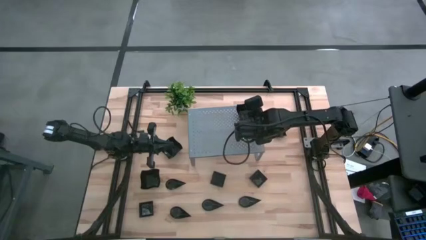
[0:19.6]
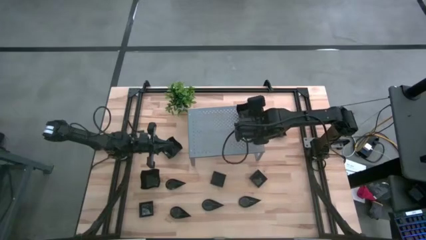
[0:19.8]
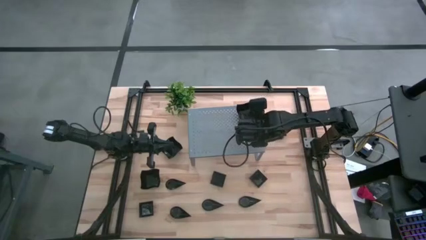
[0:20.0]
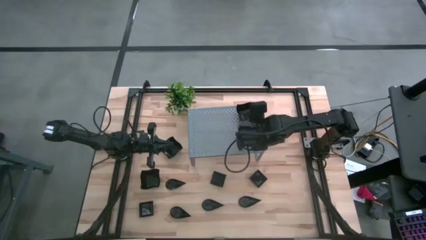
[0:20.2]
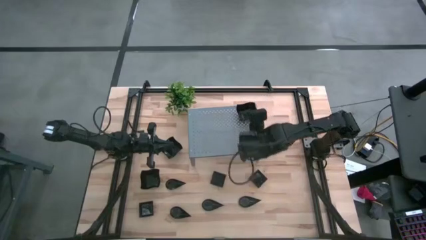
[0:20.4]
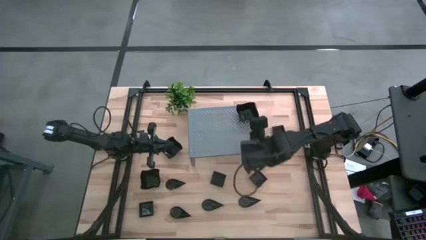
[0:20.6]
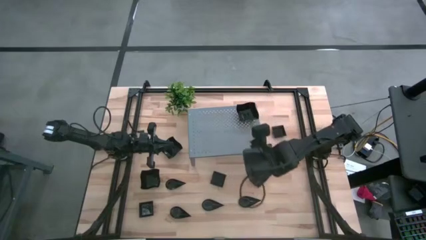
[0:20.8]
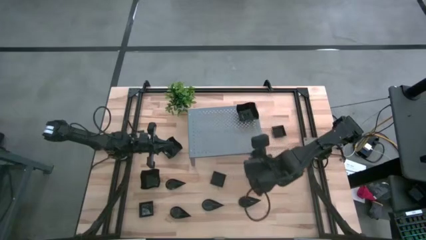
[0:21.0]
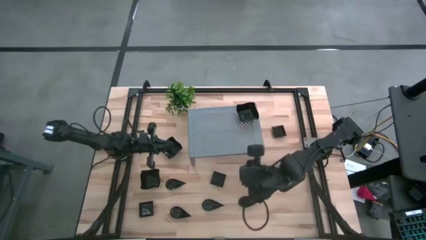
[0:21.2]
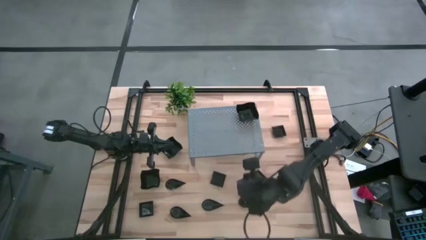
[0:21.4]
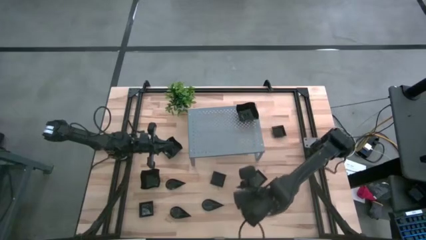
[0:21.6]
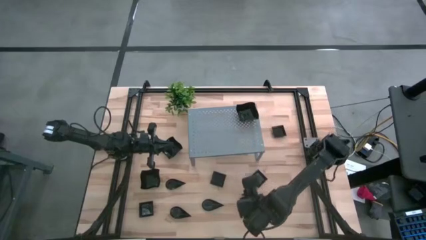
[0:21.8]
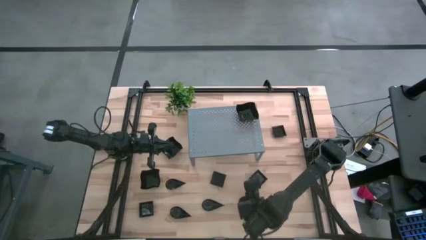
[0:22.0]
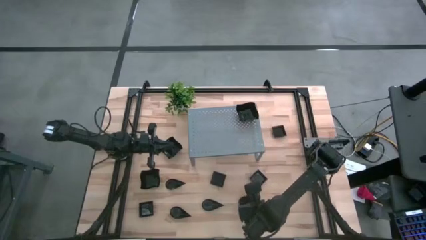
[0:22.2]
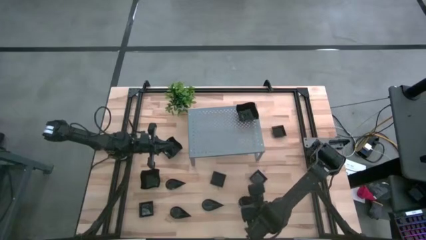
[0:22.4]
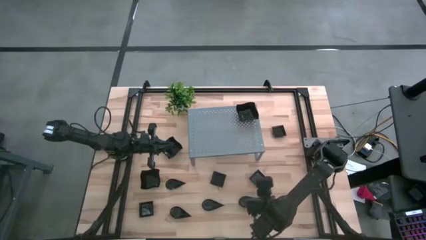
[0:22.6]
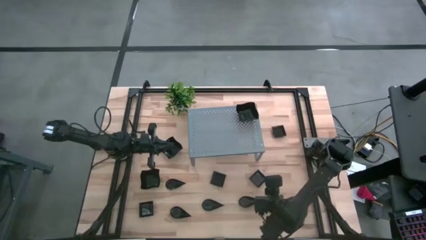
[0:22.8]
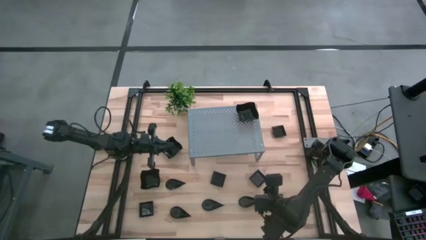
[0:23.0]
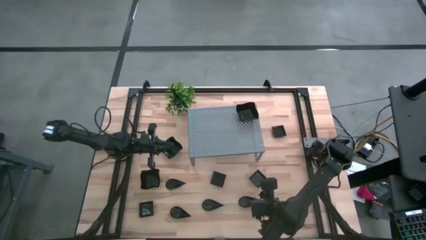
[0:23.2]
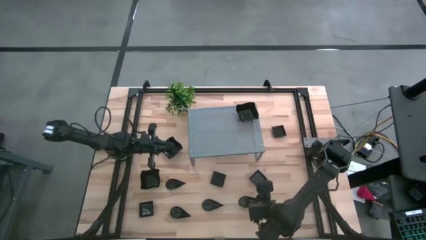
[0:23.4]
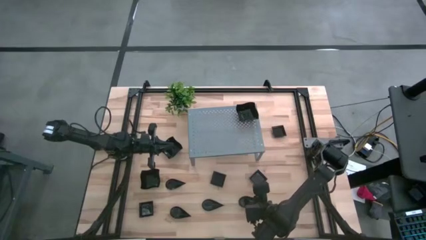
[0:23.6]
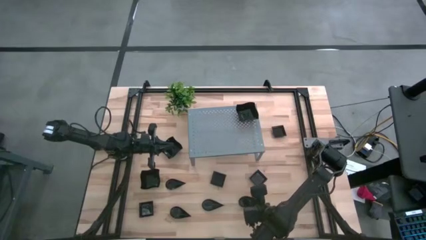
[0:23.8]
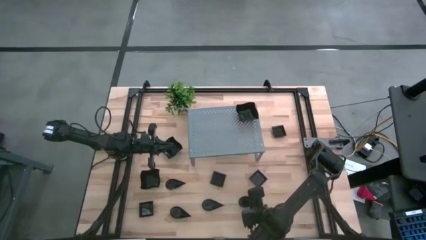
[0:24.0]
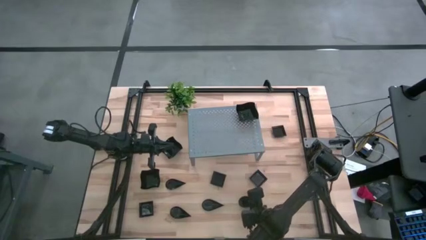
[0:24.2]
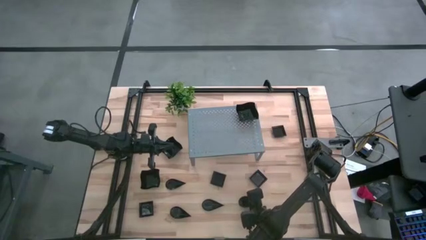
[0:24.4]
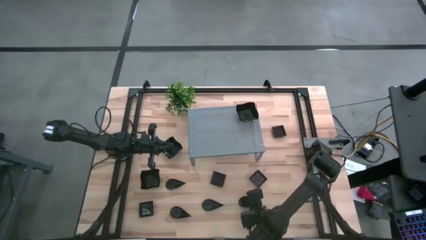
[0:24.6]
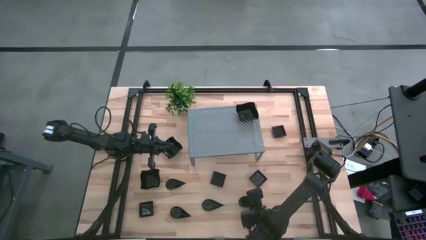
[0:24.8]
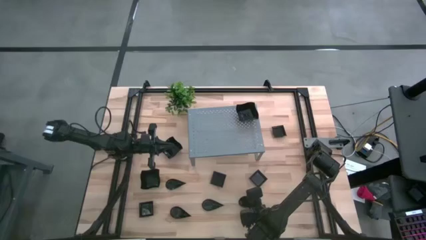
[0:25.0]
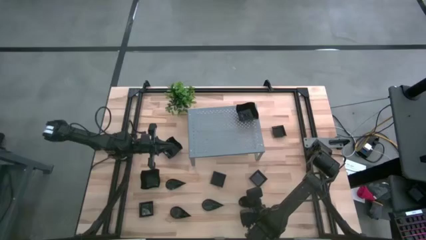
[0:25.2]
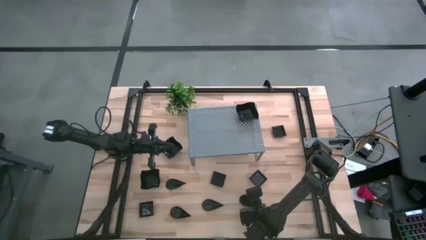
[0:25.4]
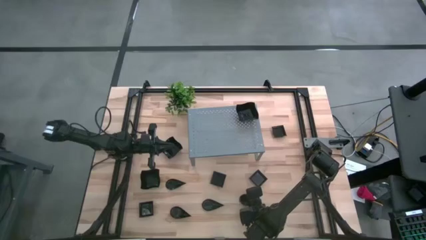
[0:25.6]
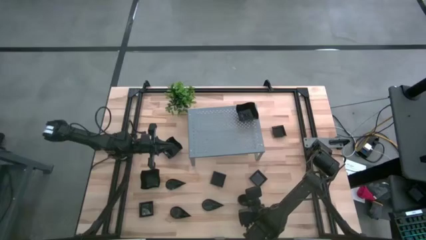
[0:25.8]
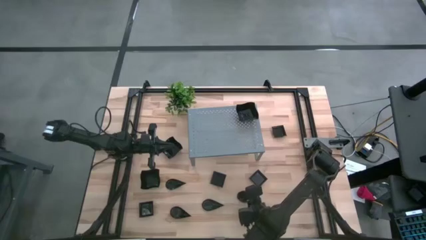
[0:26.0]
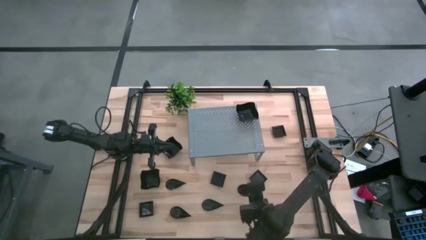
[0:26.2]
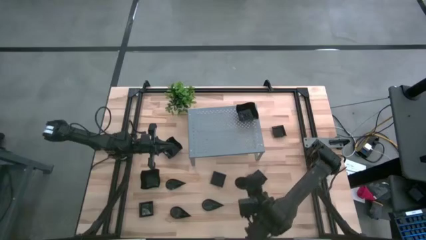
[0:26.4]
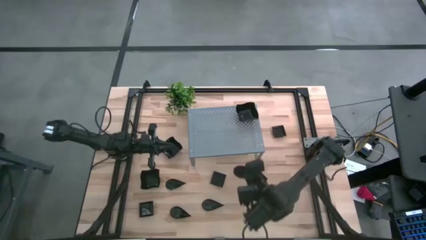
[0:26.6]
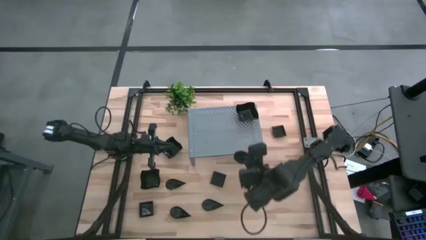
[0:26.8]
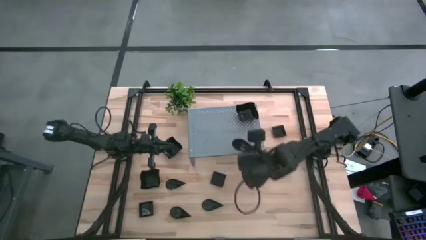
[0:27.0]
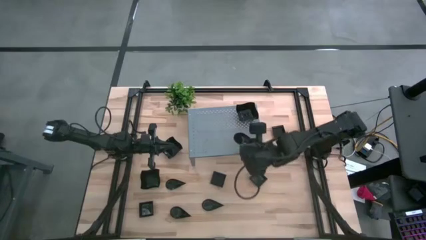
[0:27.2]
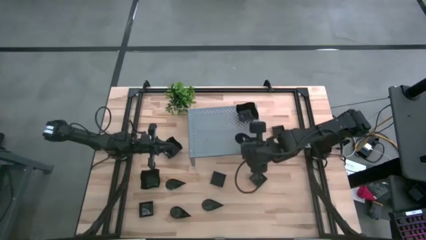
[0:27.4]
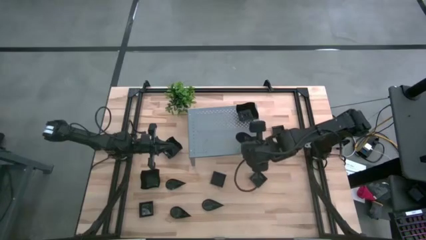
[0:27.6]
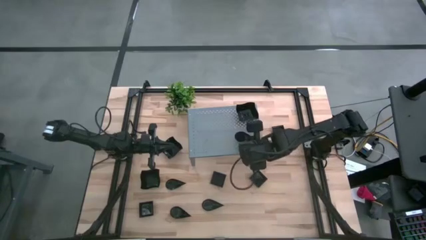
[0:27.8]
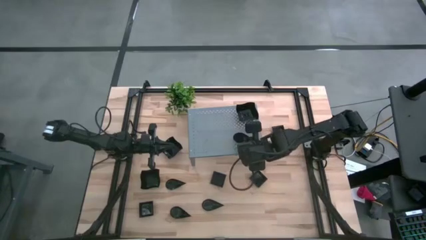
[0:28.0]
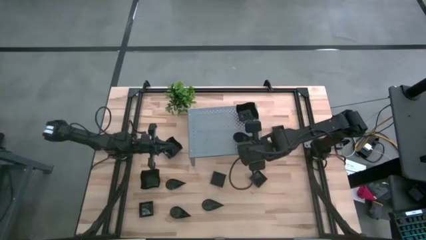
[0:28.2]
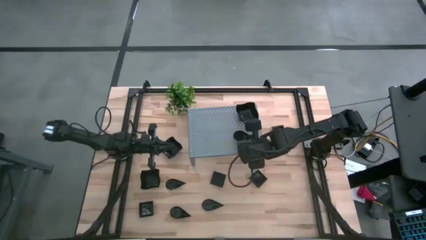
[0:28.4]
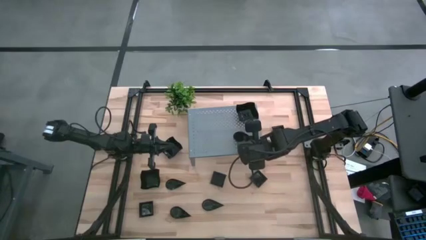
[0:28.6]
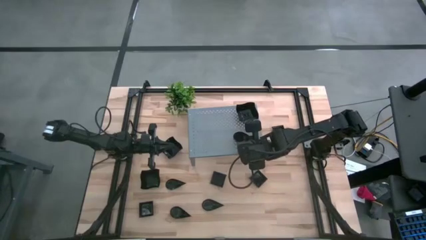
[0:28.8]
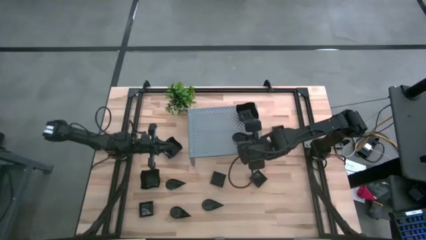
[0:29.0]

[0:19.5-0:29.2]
Task: Pick & Place Mini shaped plates
Put the black drop-shaped plate on the shelf

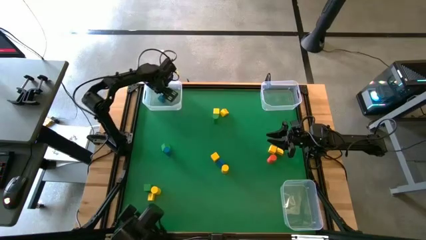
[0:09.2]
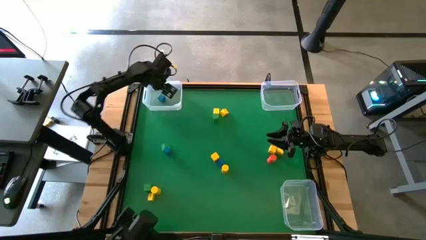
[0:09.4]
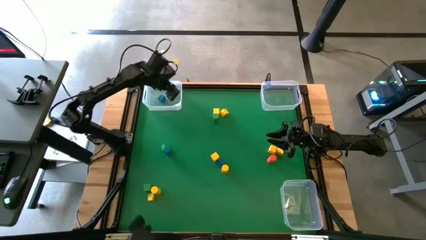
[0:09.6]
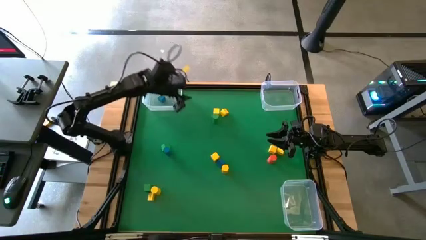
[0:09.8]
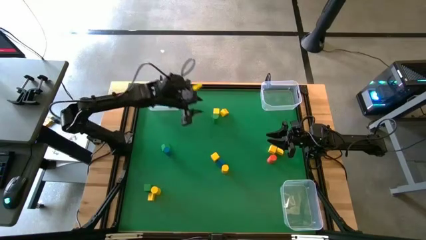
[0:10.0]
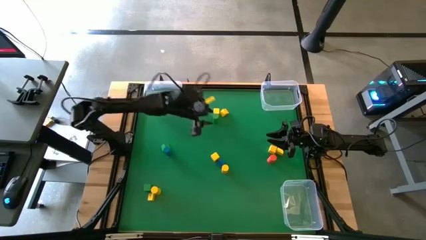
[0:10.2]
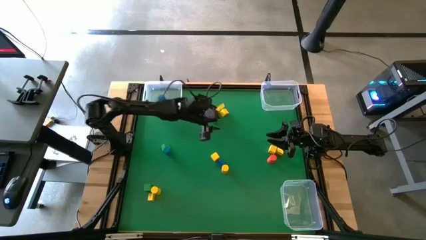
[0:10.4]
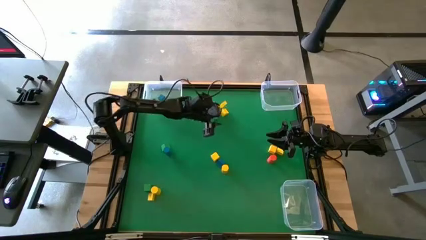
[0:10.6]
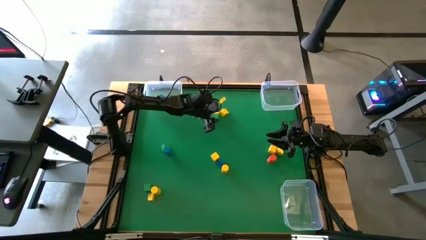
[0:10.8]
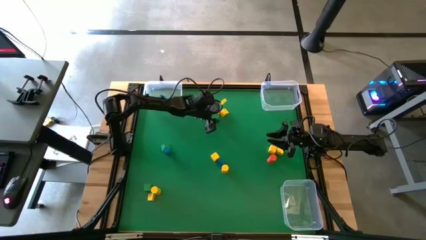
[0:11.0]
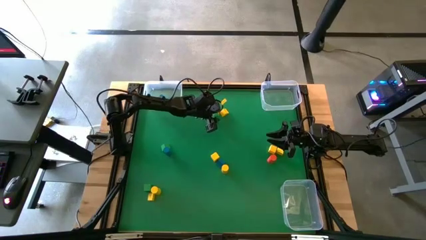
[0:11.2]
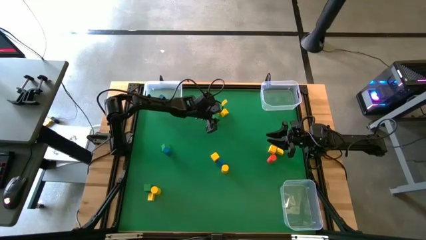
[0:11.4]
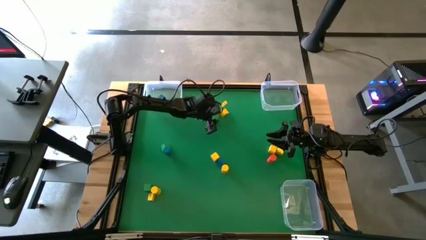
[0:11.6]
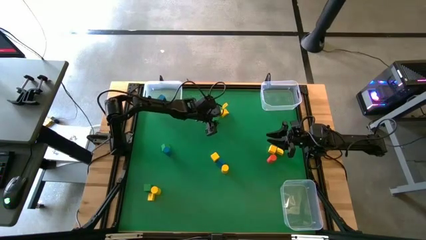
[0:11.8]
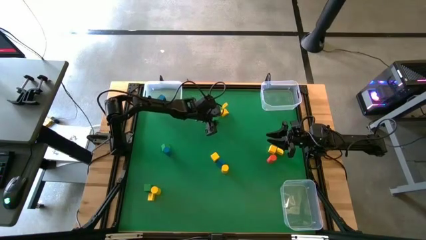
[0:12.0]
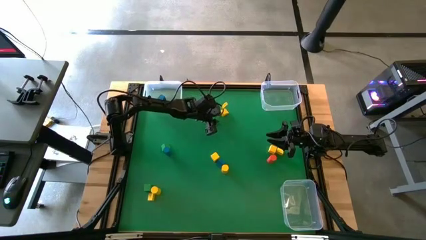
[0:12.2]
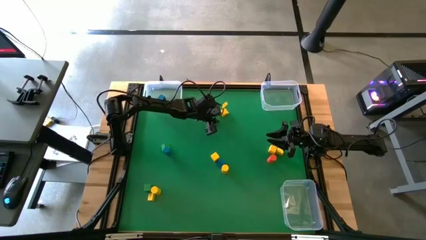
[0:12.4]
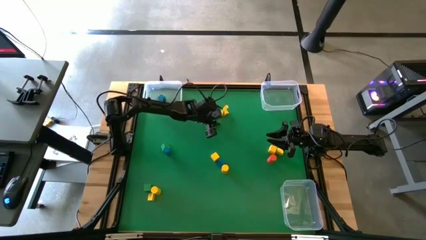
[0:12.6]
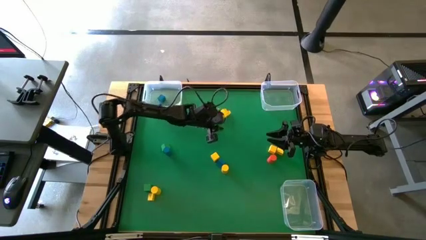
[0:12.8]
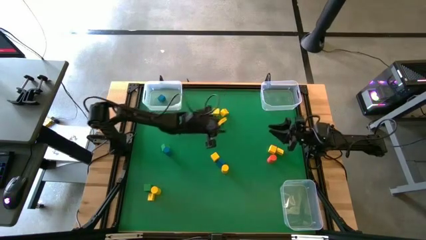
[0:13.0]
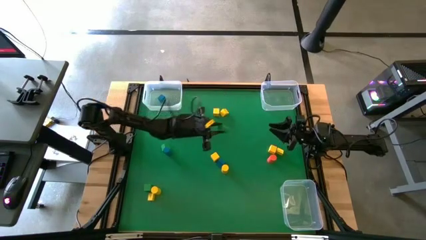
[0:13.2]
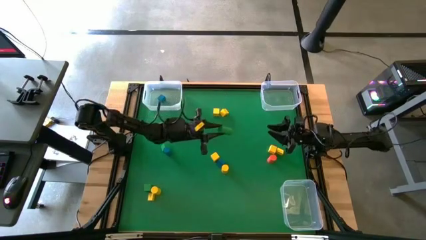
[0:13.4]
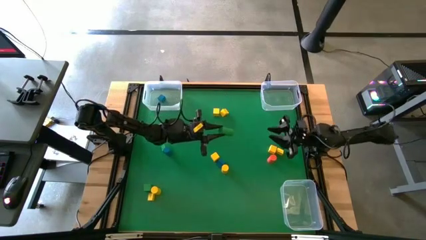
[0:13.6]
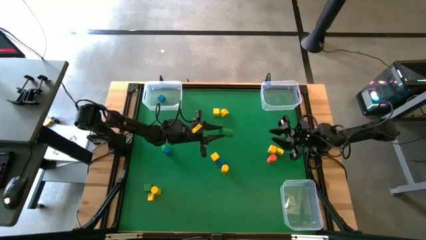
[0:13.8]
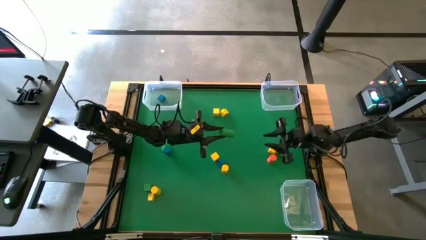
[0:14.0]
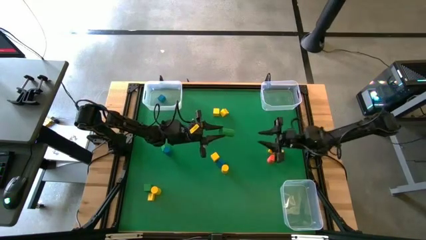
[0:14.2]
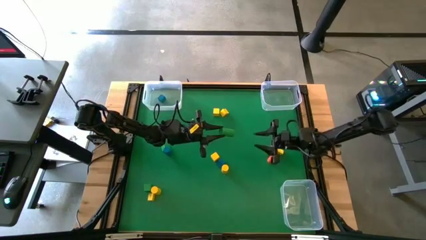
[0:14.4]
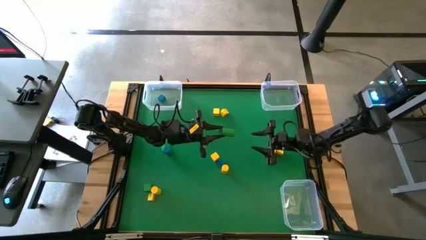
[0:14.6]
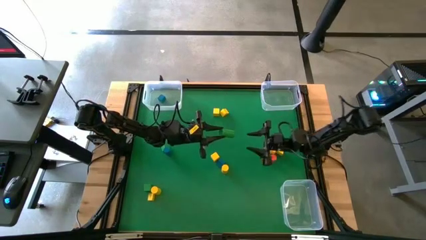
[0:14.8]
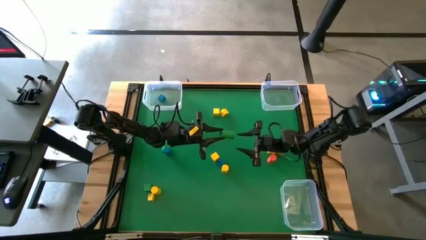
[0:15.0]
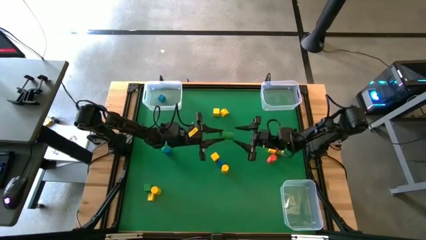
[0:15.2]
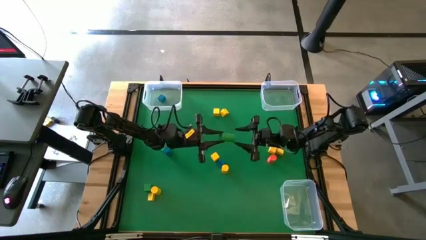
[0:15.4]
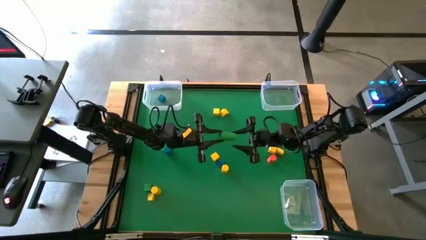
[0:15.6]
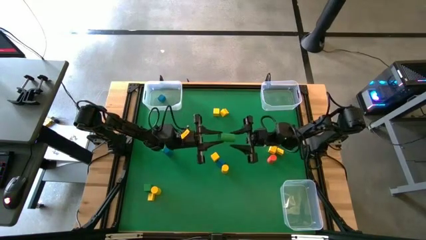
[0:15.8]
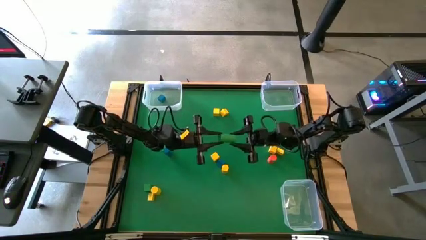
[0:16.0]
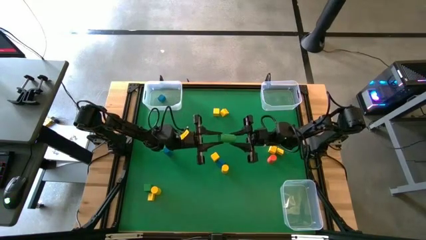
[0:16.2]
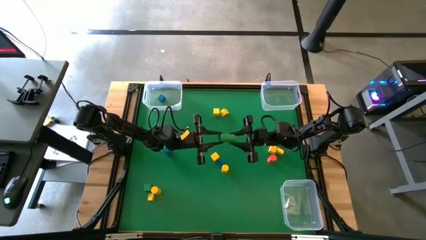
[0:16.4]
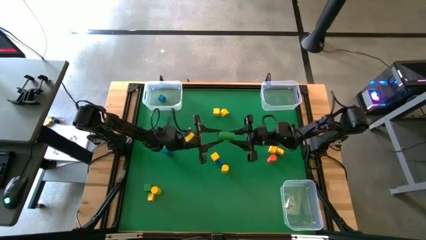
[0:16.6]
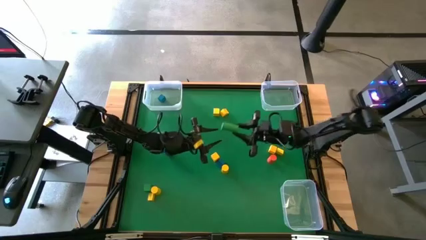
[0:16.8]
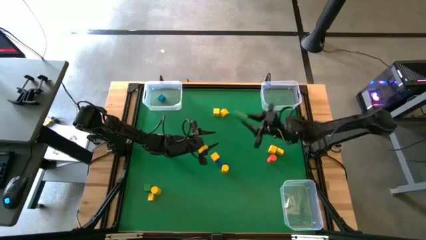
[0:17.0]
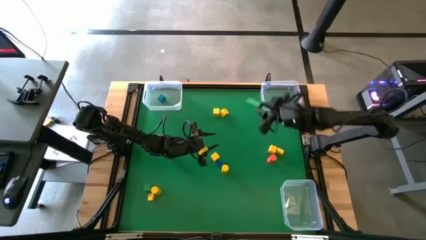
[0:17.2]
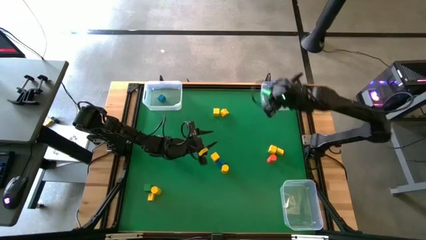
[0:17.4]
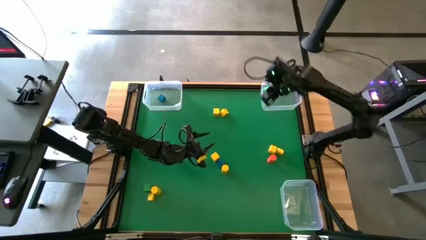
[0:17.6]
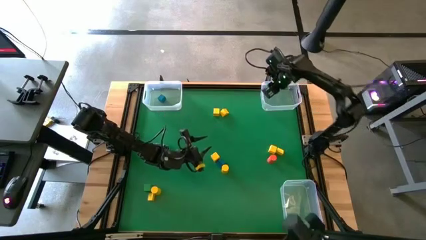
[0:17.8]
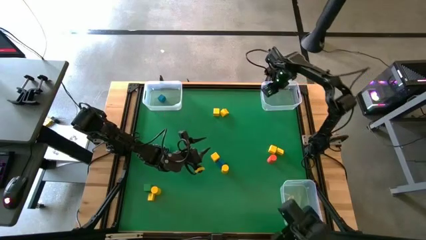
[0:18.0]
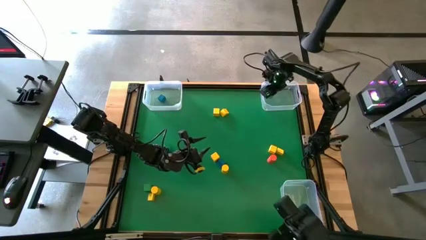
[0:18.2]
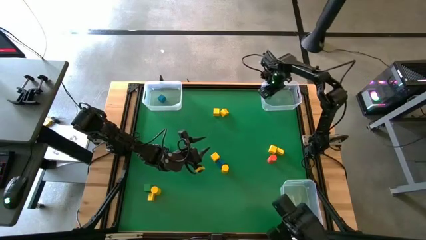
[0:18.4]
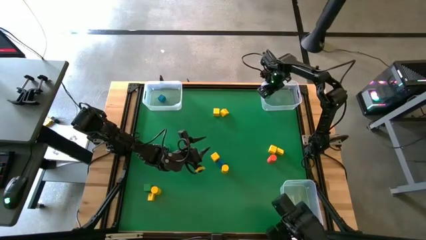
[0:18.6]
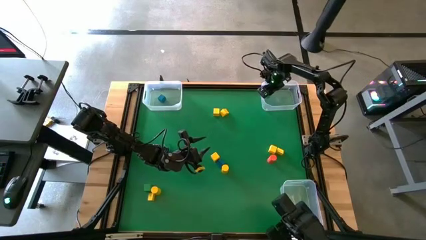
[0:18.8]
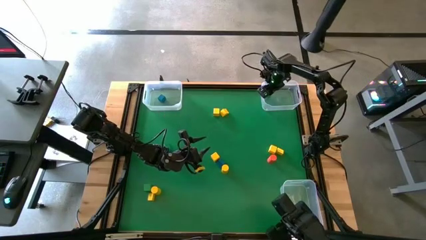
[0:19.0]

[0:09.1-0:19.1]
Task: Sort blocks by size
Put the green cylindrical block into the top right transparent bin
